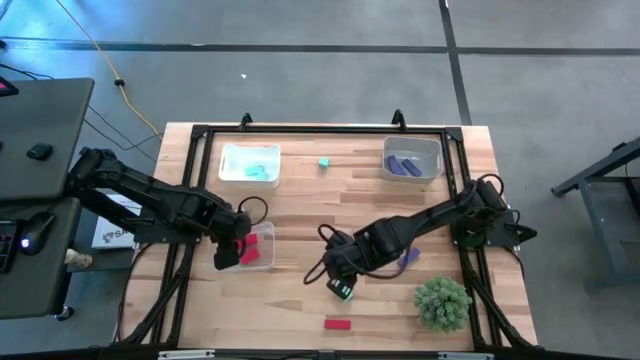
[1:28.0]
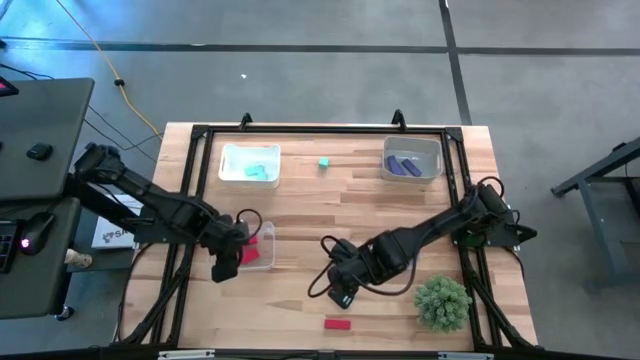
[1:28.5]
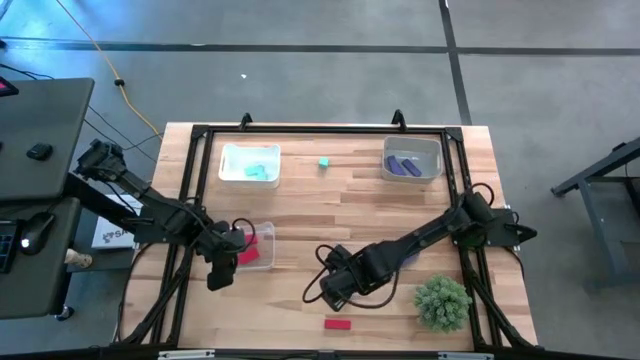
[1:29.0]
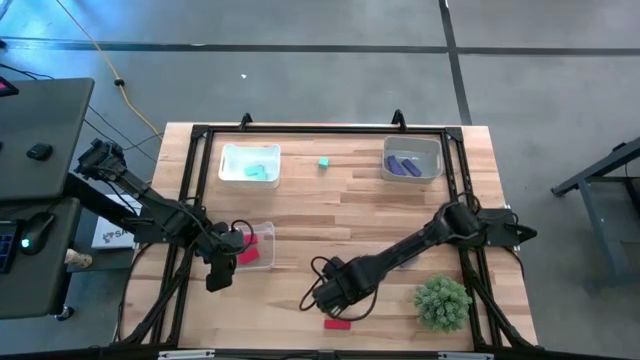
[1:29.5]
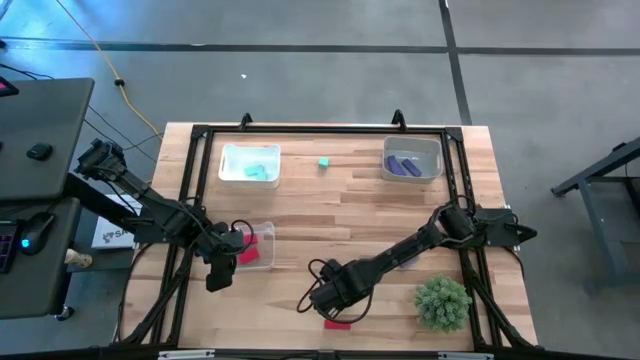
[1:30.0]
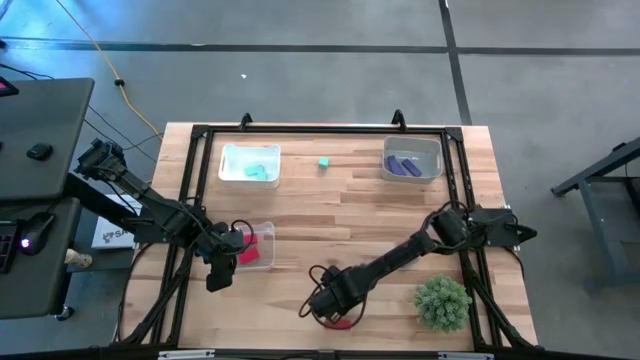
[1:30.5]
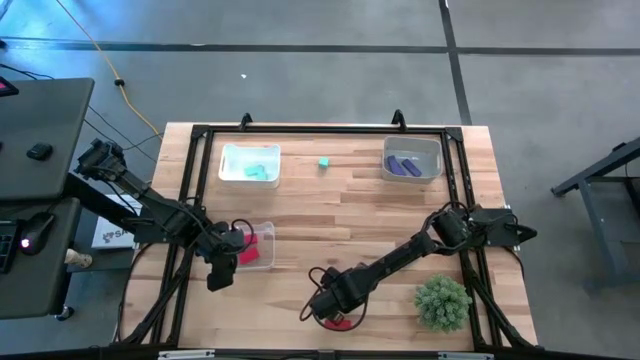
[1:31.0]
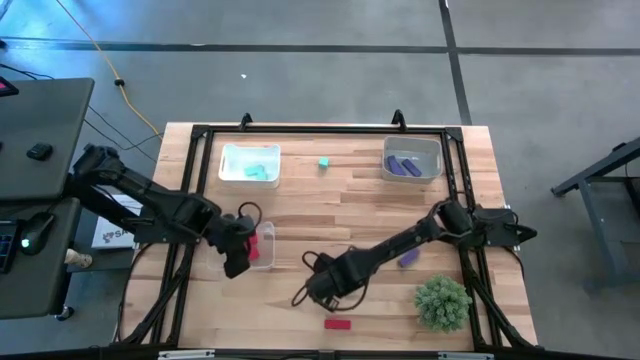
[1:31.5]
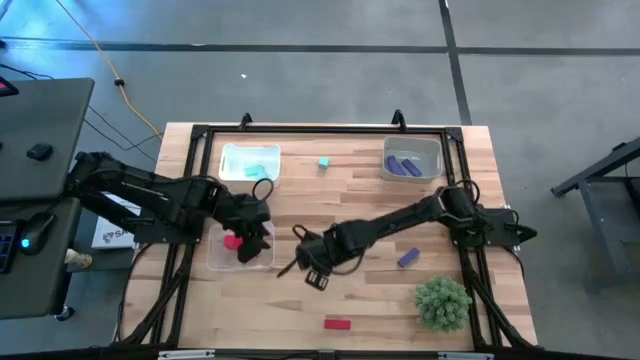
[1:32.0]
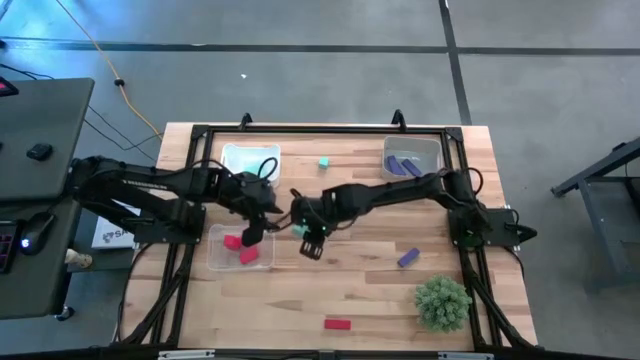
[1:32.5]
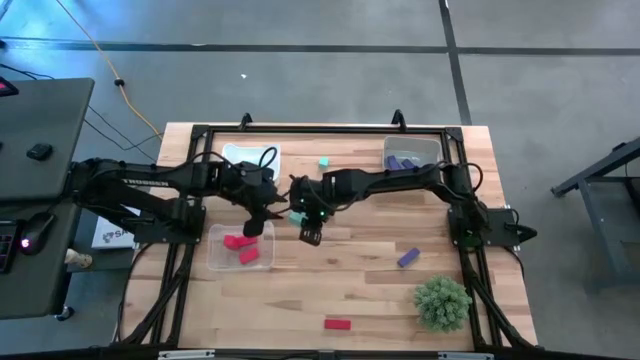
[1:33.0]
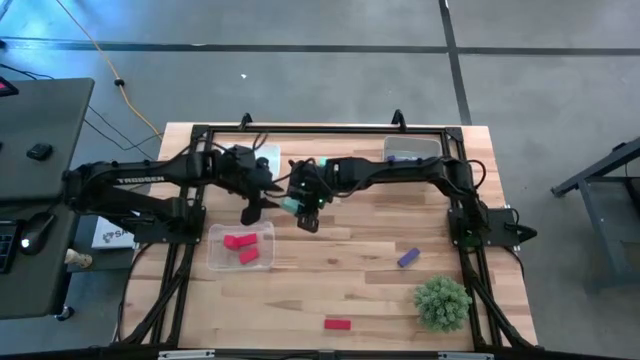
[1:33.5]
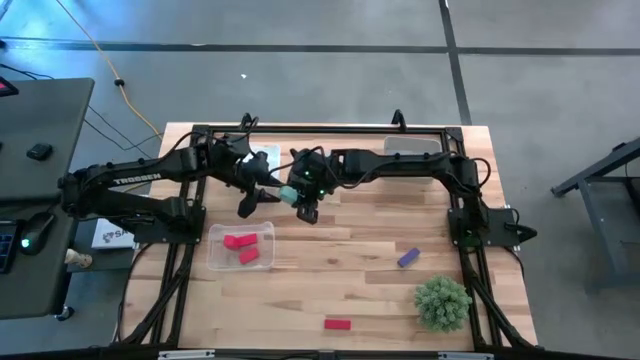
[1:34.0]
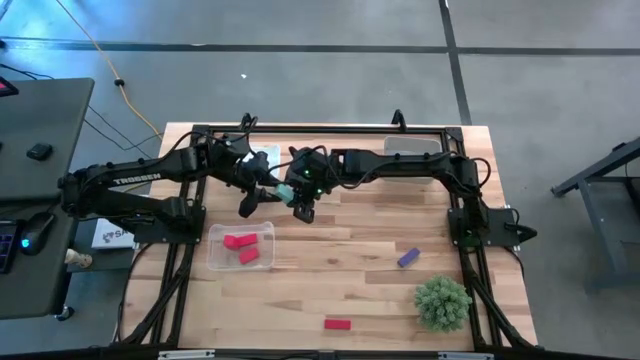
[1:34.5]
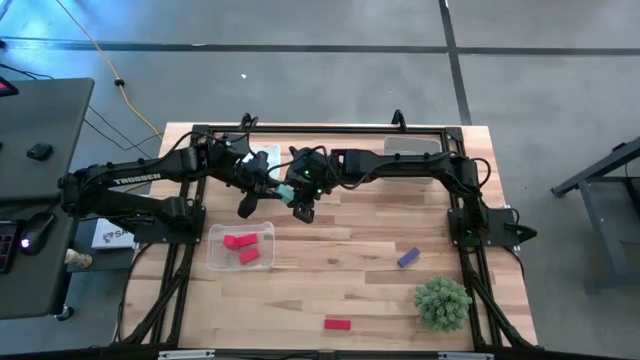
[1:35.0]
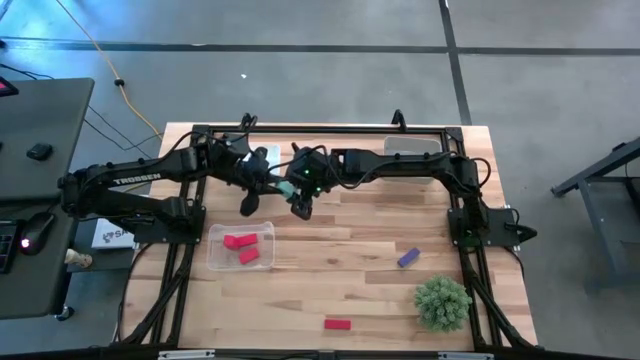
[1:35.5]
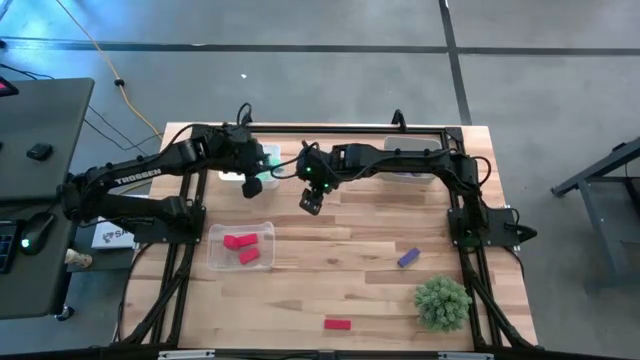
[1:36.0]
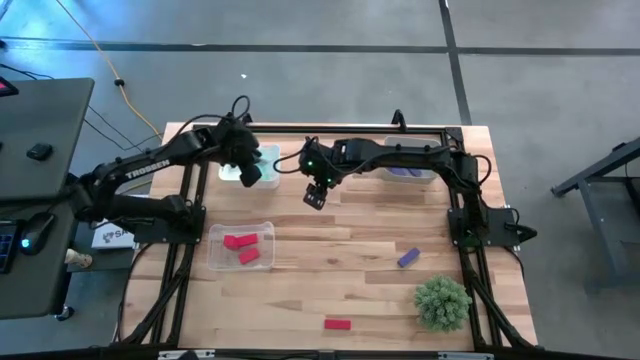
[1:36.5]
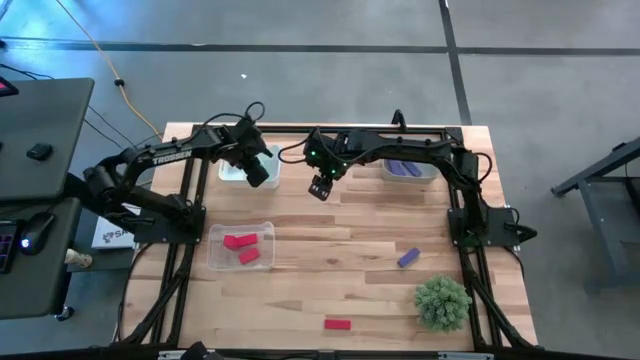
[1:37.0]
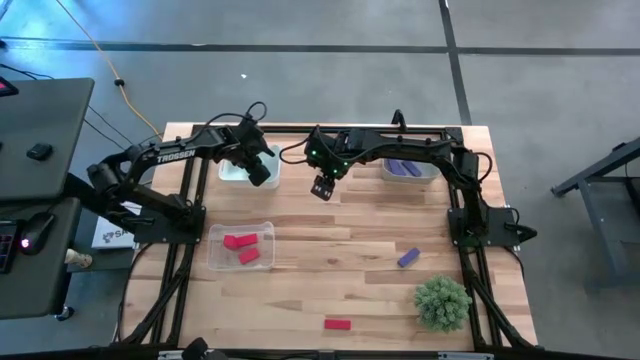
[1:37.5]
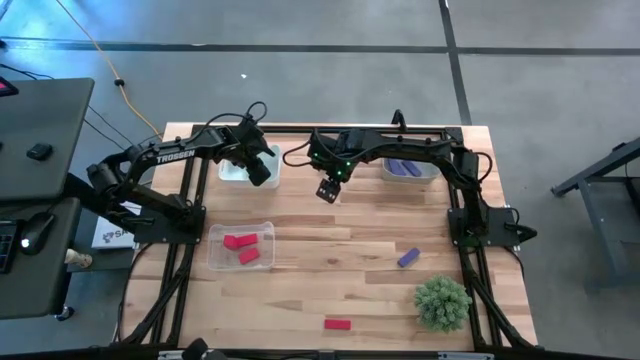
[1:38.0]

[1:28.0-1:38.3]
Task: Sort & place blocks by color
Put the bottom light blue block into the white bin

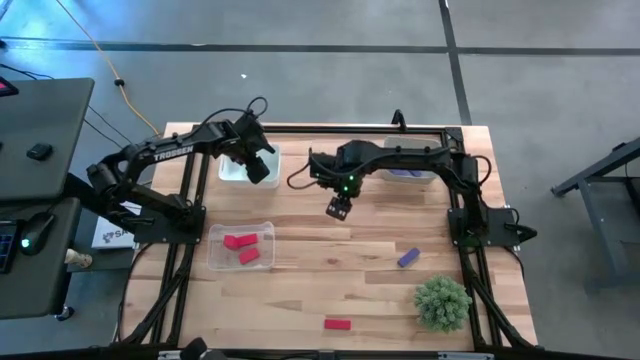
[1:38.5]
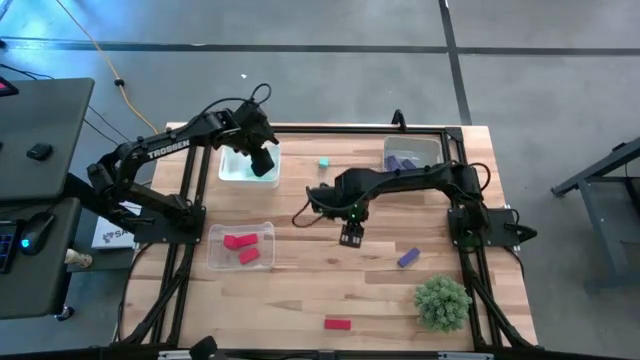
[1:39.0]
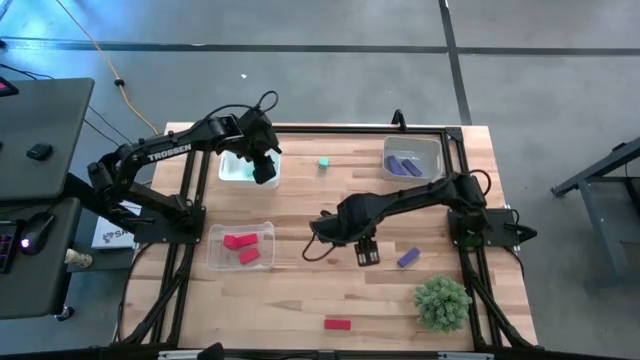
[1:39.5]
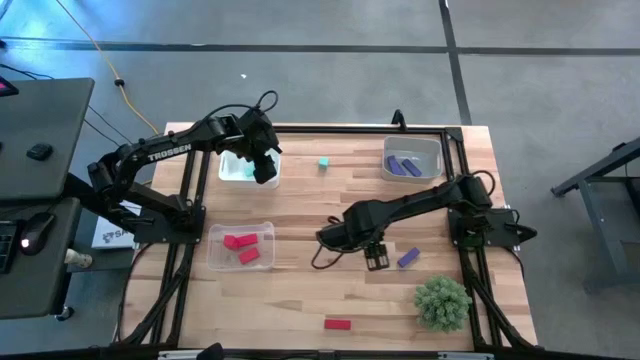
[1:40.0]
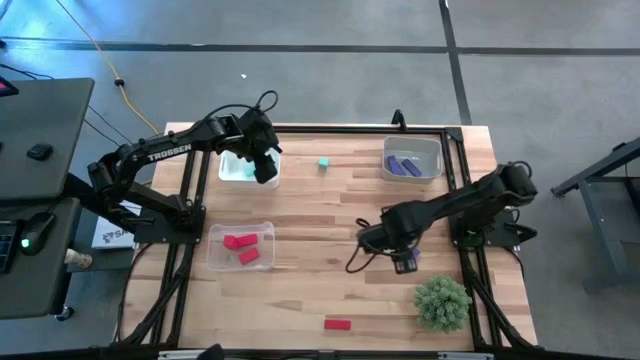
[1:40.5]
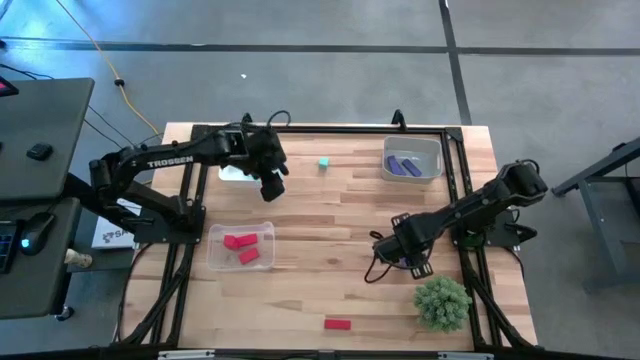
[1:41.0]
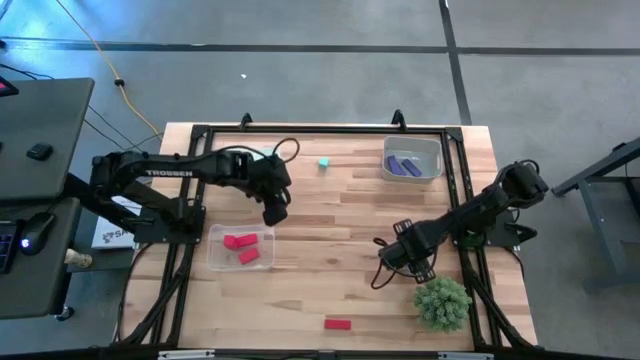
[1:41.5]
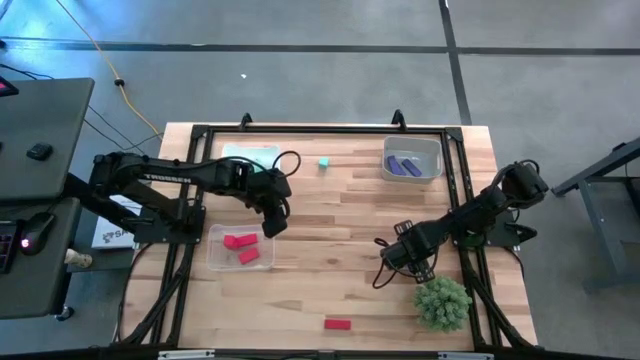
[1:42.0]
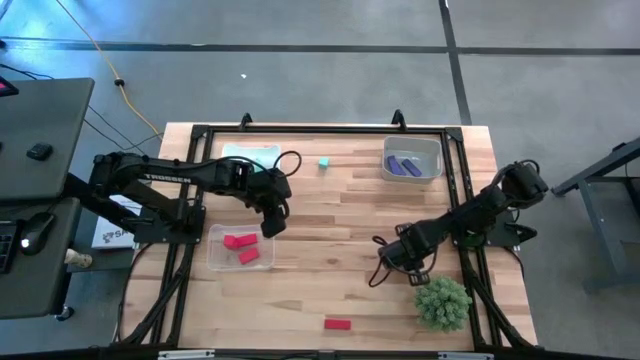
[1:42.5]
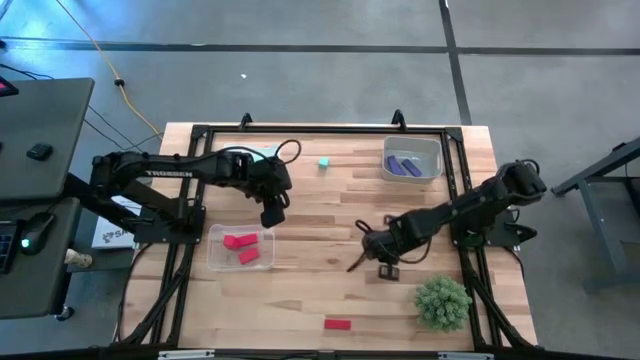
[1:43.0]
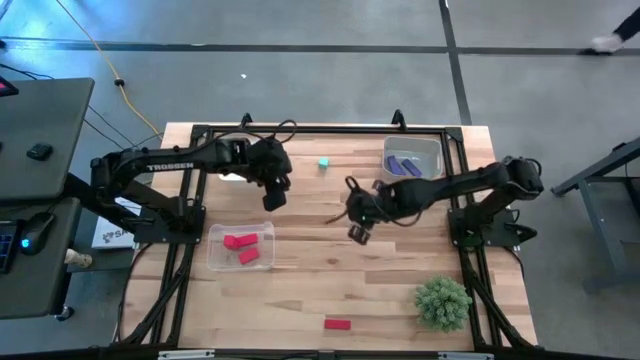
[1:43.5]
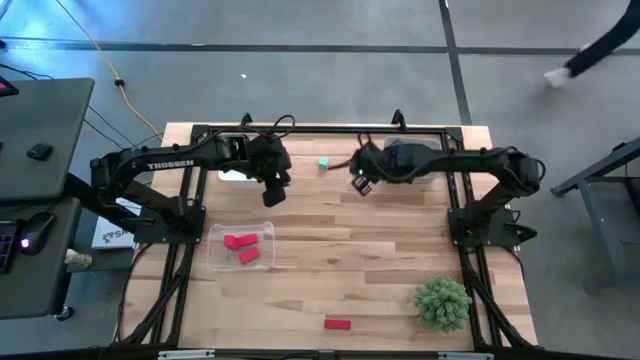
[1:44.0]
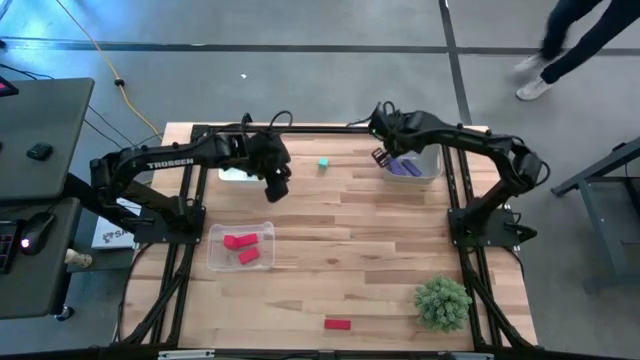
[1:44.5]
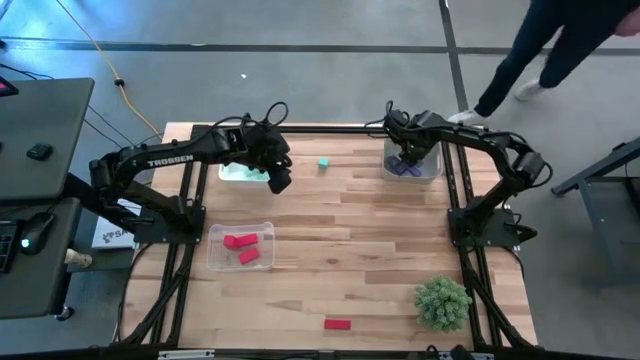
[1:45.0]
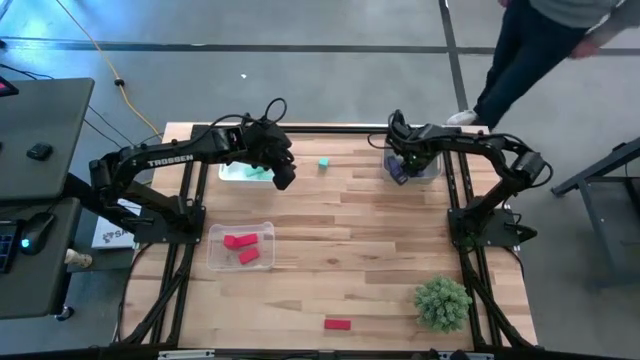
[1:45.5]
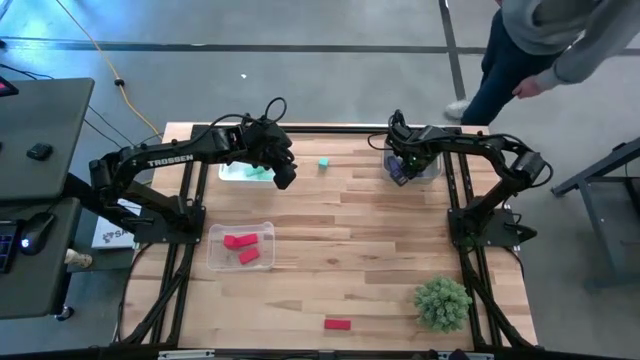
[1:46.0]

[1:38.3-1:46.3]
Put the violet block into the gray bin

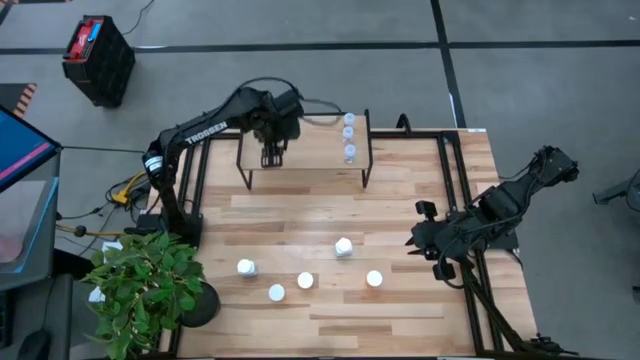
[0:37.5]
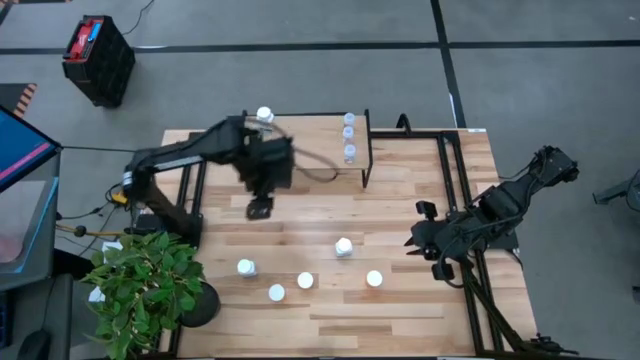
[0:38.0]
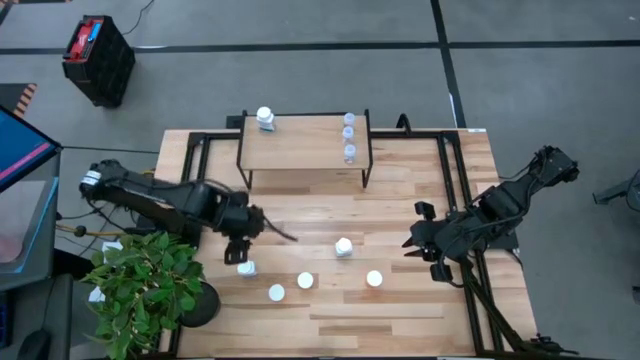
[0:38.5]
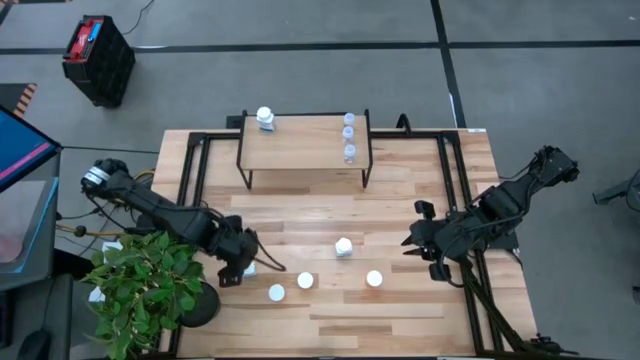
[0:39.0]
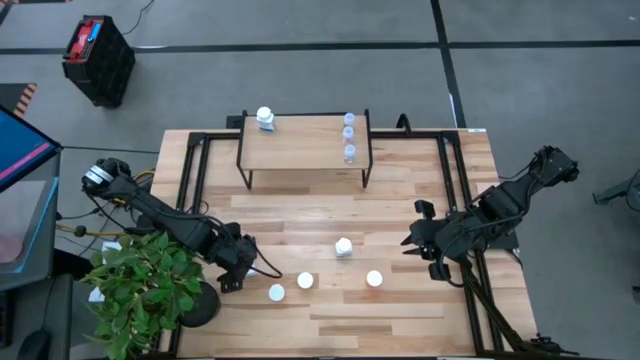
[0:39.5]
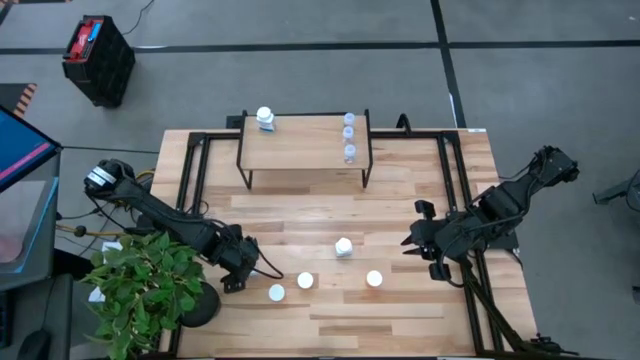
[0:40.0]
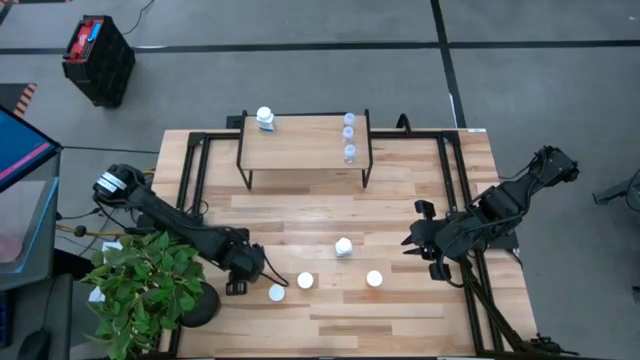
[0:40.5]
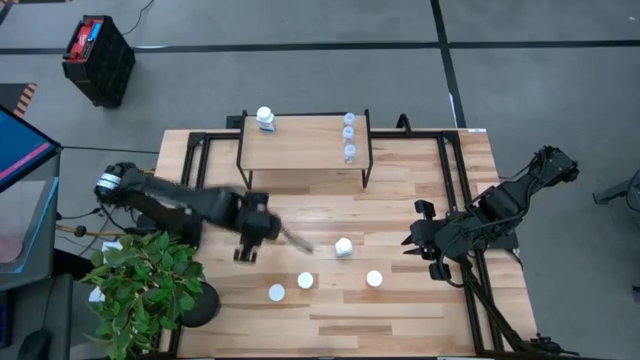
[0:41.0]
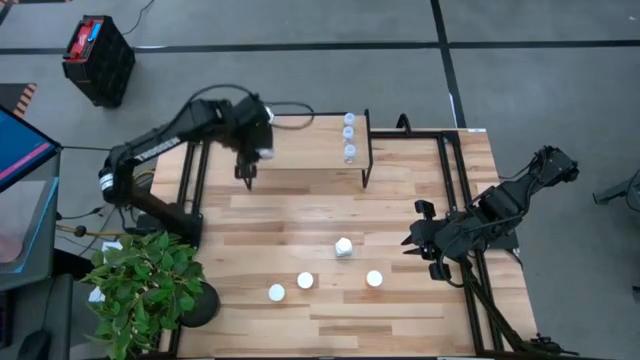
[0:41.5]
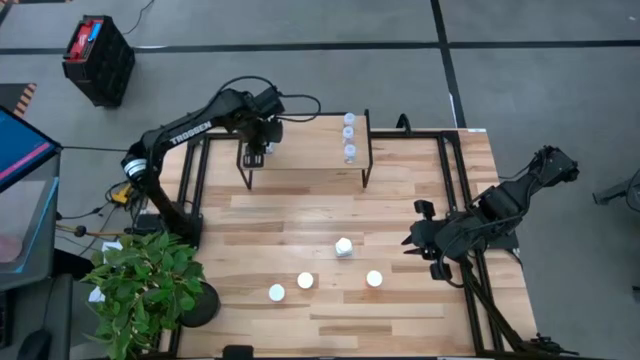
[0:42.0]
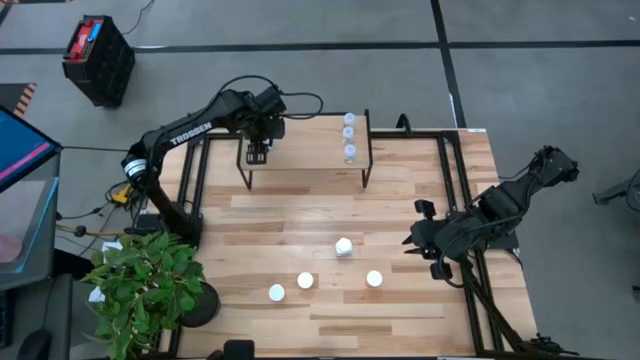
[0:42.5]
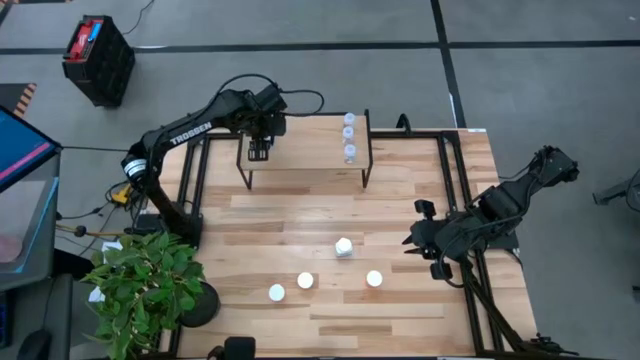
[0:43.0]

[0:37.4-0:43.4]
Task: Pick and place medicine bottles onto shelf by color
Put the left white pill bottle on the shelf aligned with the other white pill bottle
